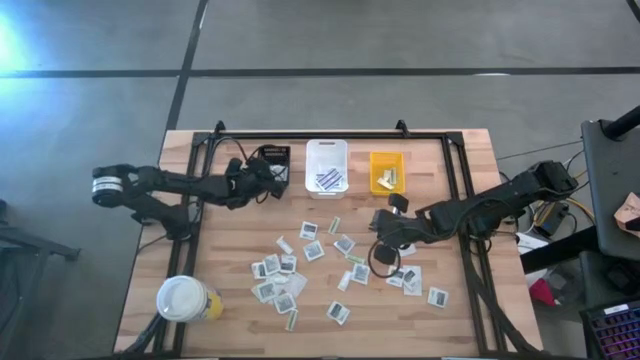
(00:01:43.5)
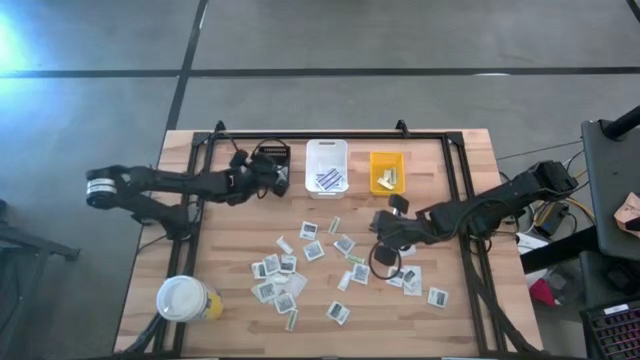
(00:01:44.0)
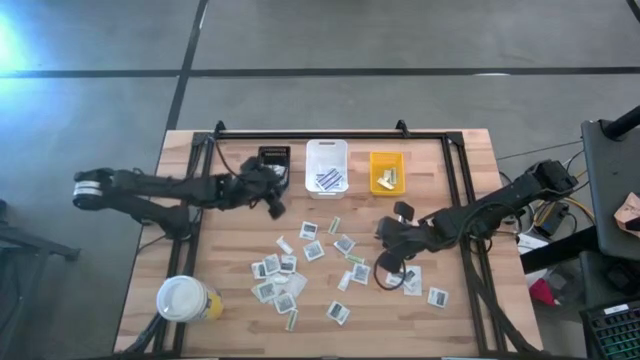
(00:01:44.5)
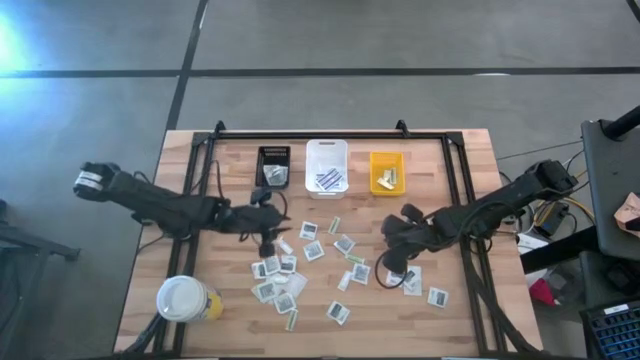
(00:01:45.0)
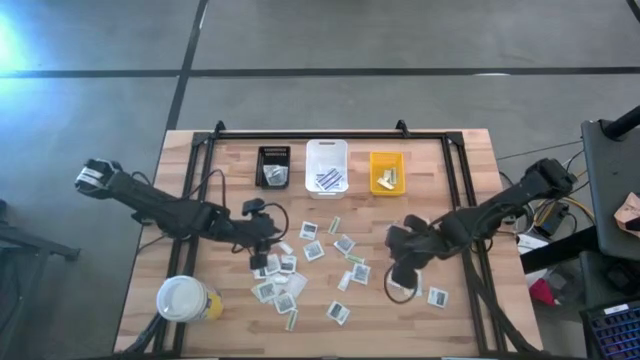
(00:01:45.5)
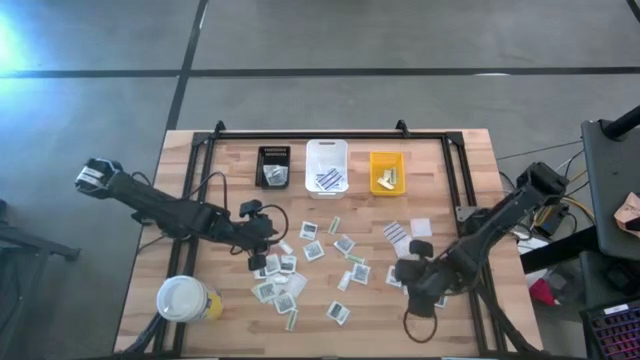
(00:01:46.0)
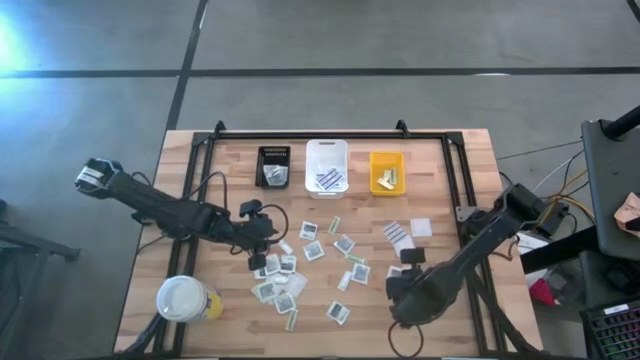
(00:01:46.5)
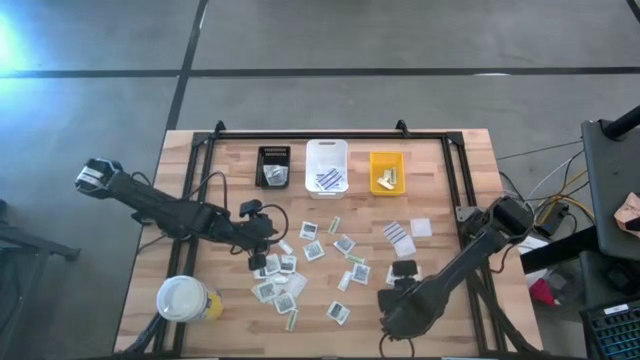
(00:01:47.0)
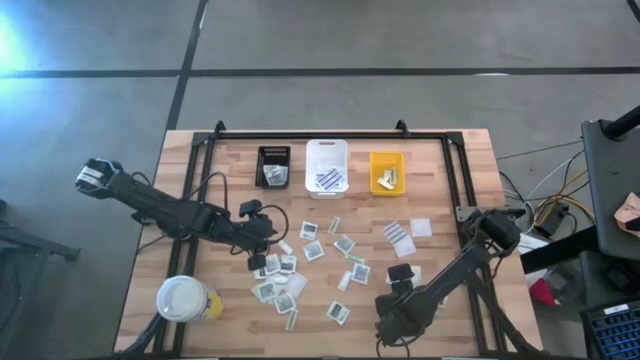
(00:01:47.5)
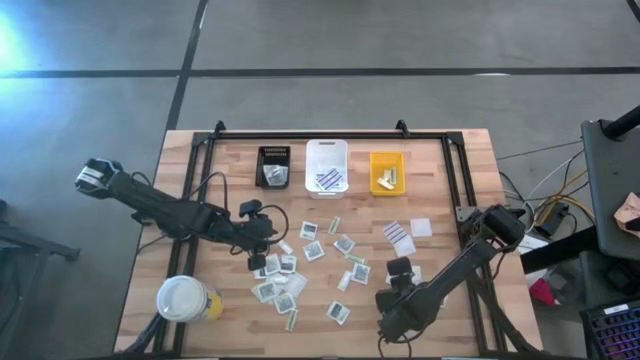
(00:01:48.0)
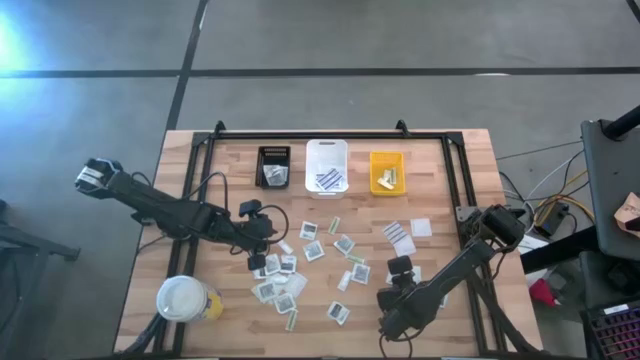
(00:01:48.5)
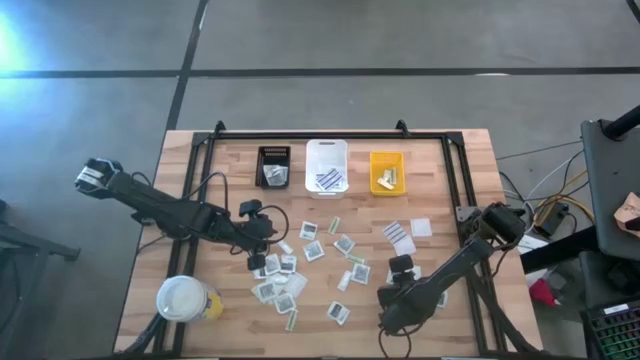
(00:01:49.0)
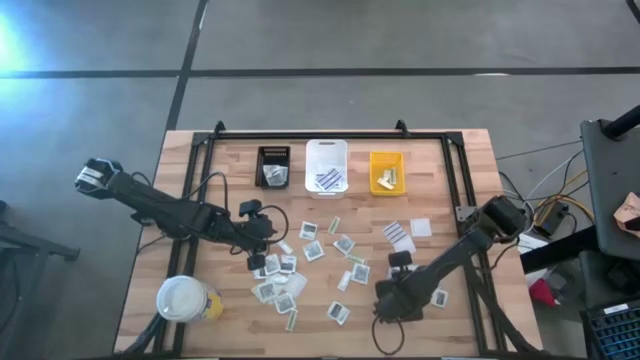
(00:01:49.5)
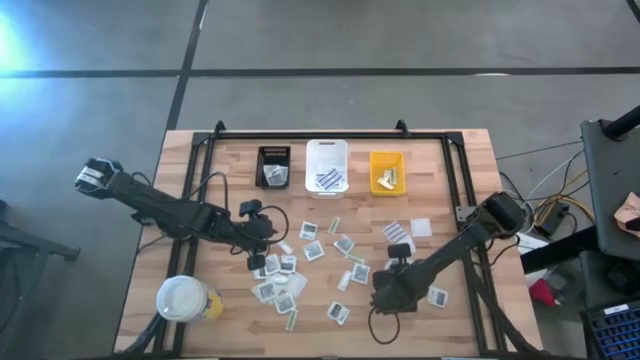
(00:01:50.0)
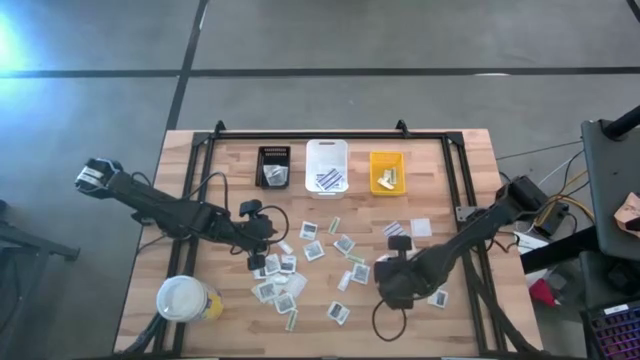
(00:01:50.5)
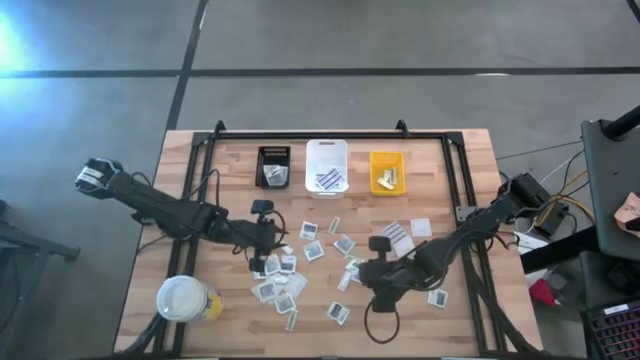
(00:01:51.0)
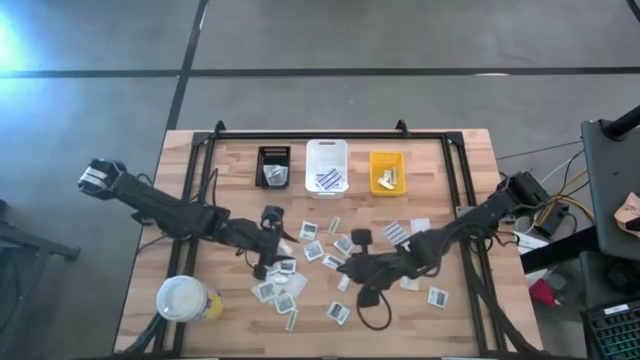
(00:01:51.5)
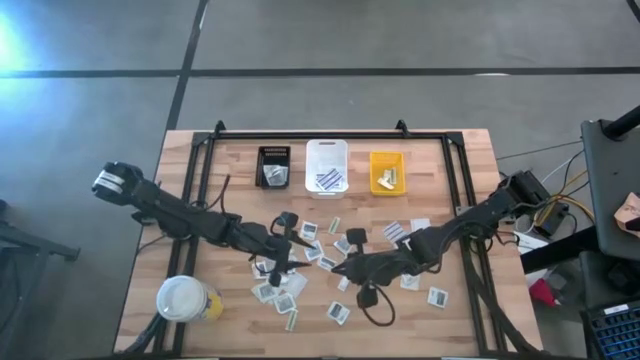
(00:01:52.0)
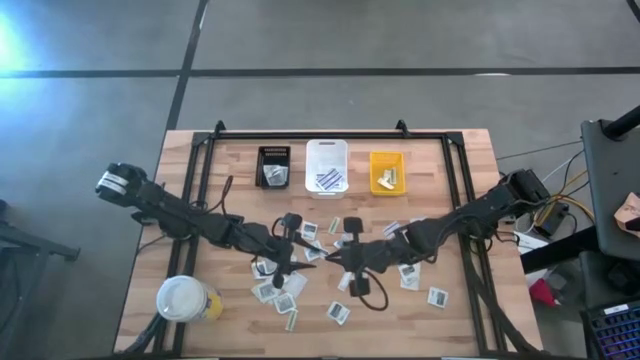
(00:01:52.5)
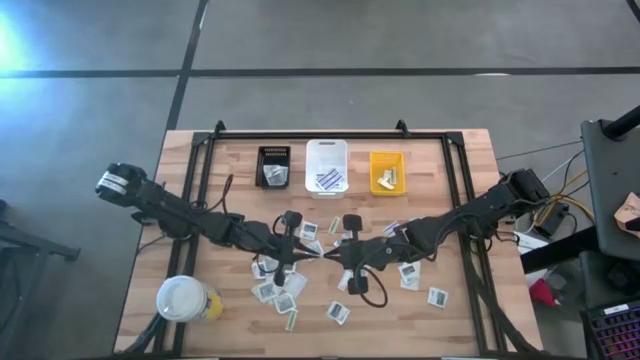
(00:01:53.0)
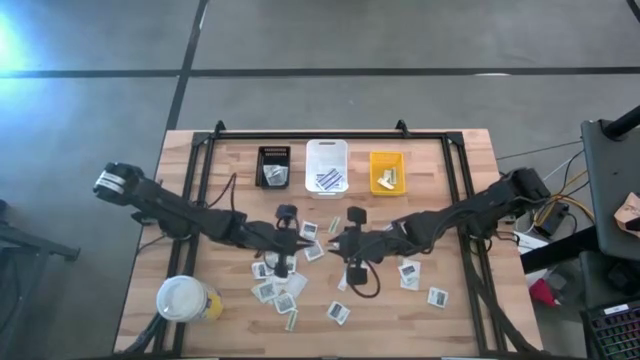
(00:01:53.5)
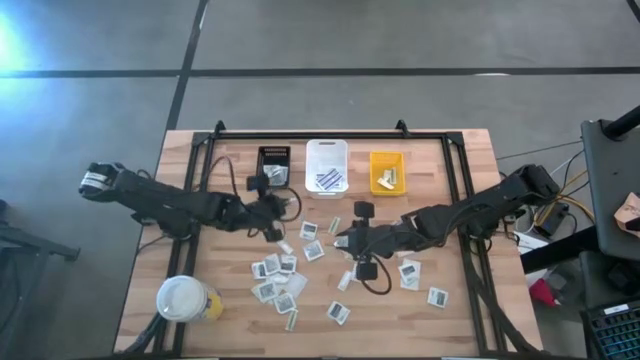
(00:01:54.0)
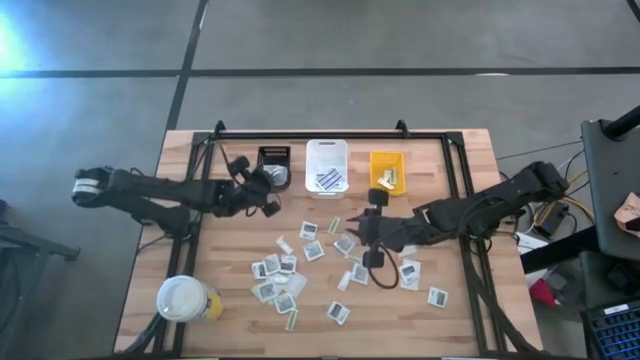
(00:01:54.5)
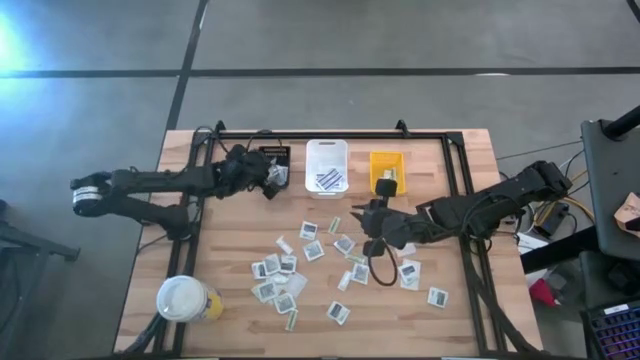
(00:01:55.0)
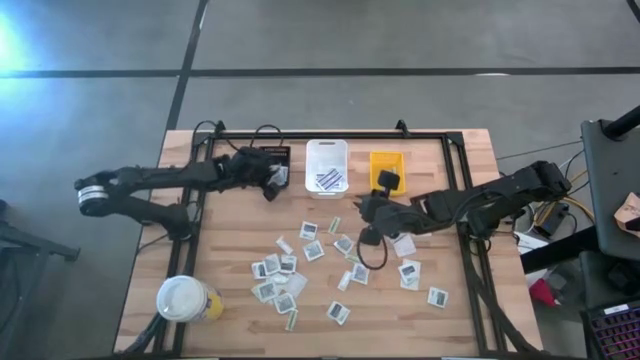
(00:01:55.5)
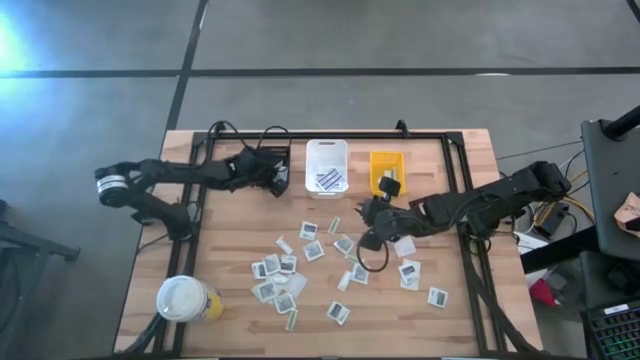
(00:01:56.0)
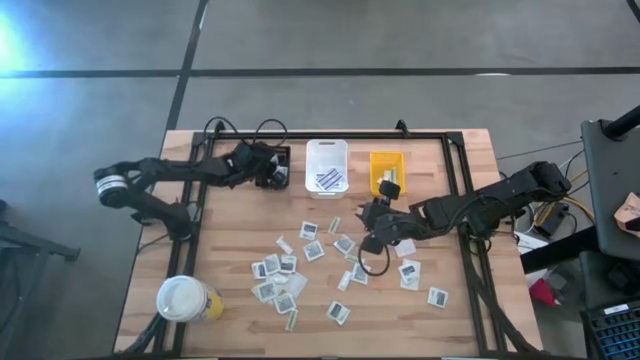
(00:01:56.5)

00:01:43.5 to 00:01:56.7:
Task: Pick & Place First Aid Supplies
Put the towelette pack into the black basket

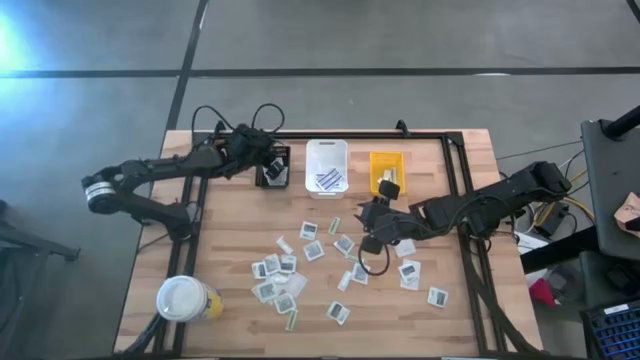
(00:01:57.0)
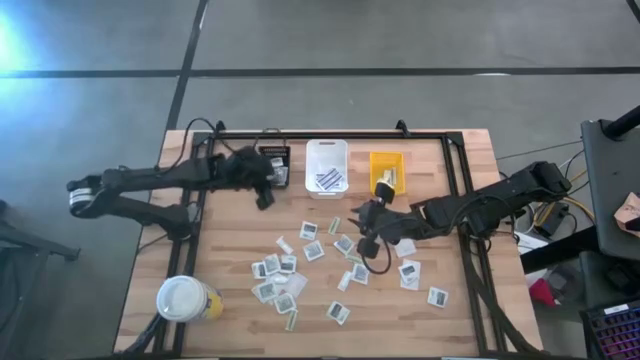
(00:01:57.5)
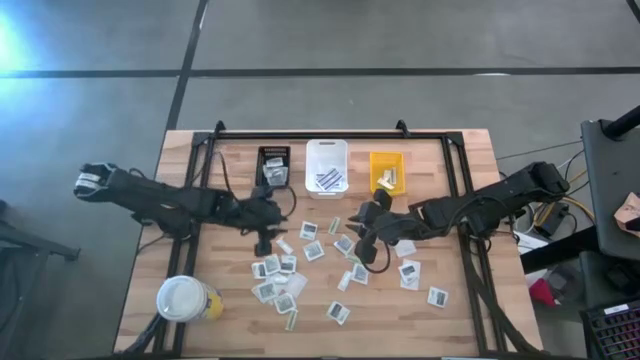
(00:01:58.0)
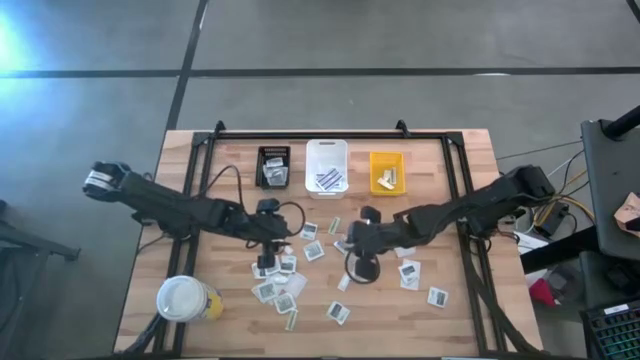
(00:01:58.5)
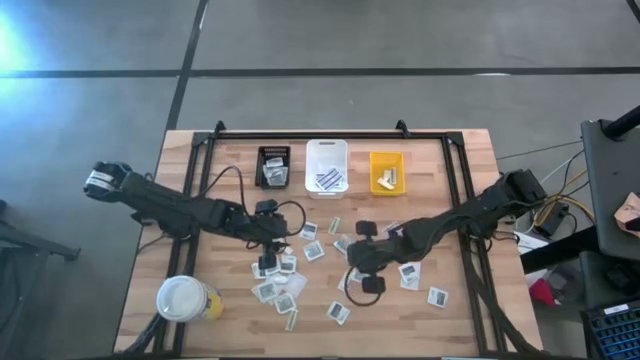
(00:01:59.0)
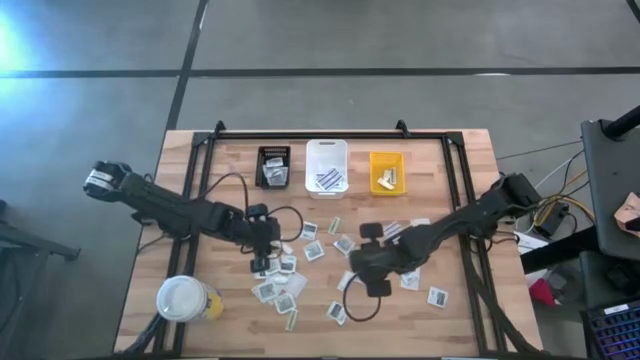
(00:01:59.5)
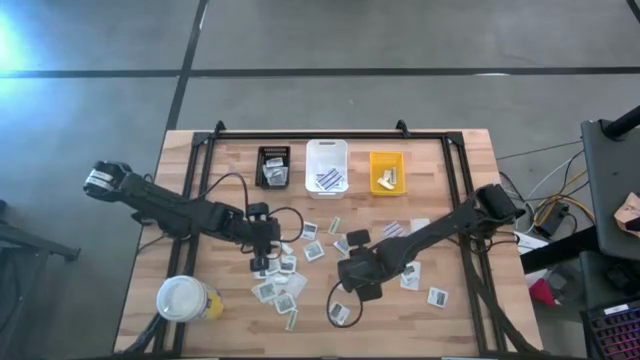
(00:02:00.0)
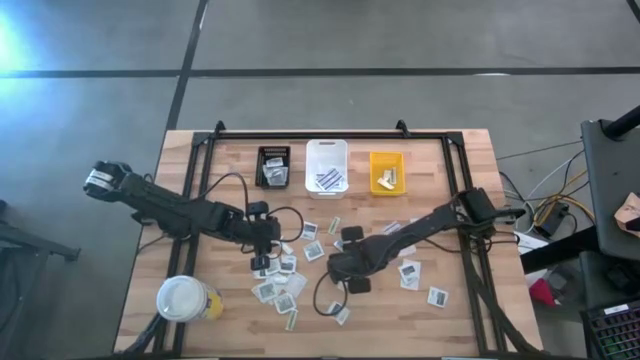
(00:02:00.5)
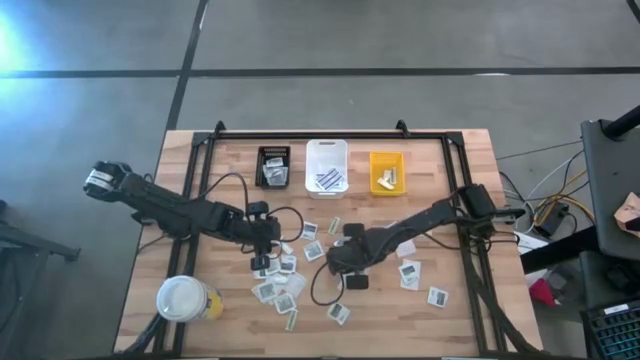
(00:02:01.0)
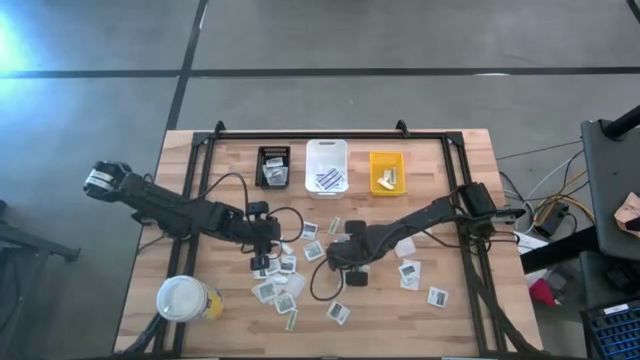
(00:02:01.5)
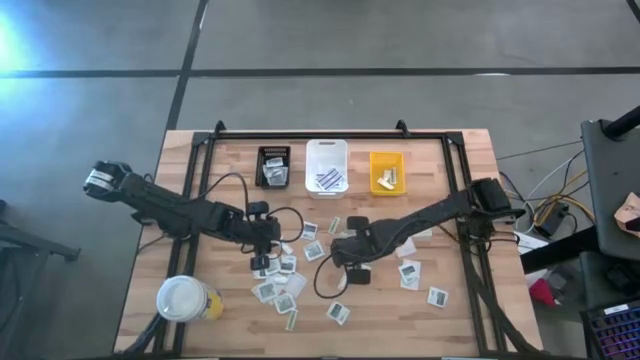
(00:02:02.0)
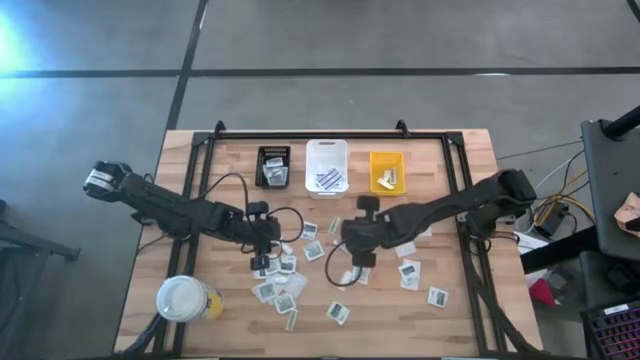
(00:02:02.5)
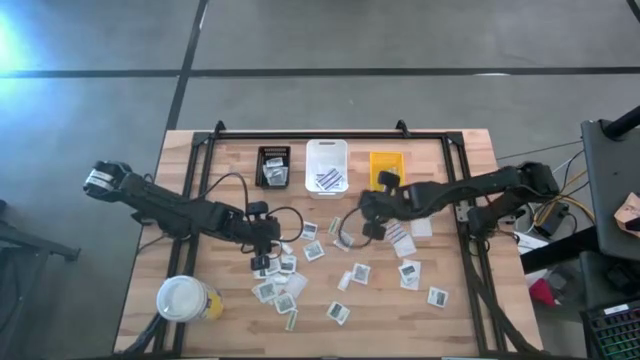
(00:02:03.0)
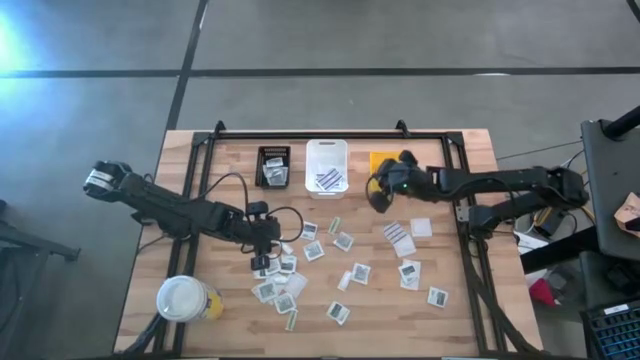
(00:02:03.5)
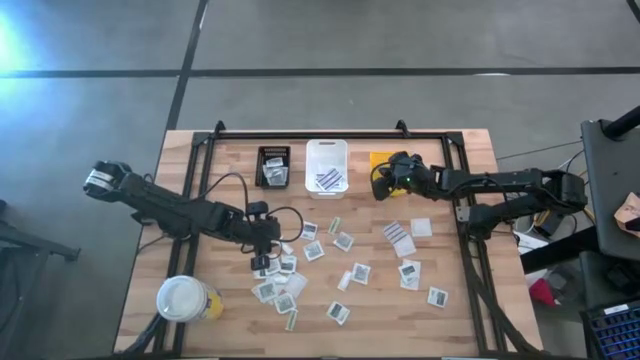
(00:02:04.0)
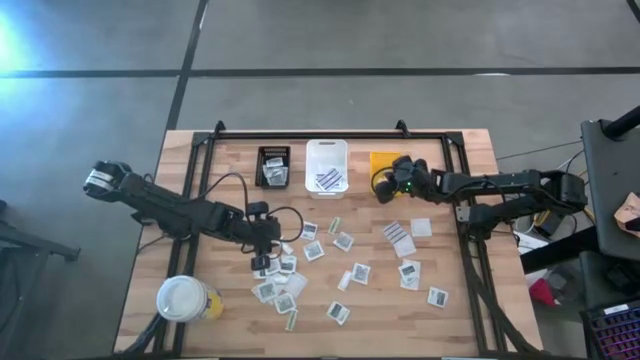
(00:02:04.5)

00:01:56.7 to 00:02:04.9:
Put the green bandage into the yellow basket
